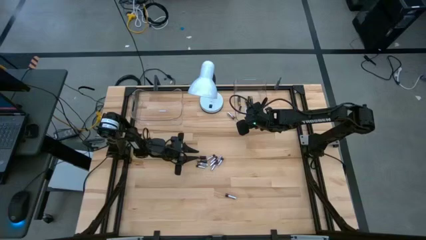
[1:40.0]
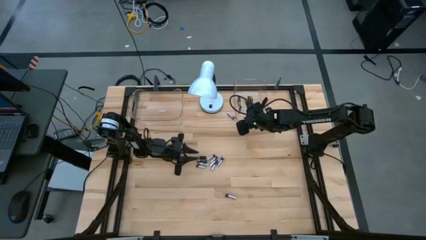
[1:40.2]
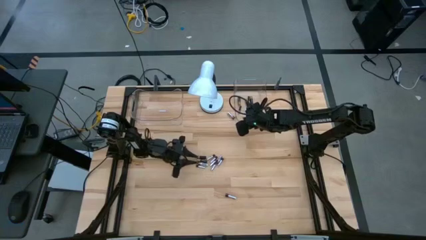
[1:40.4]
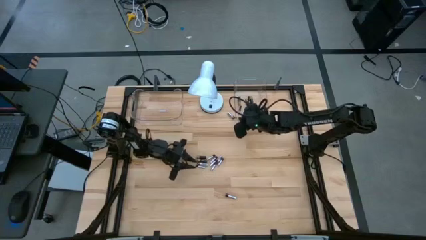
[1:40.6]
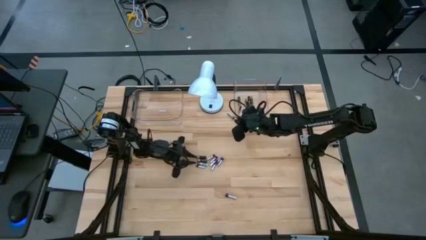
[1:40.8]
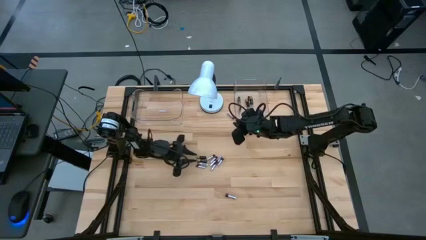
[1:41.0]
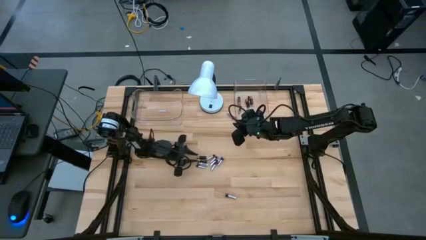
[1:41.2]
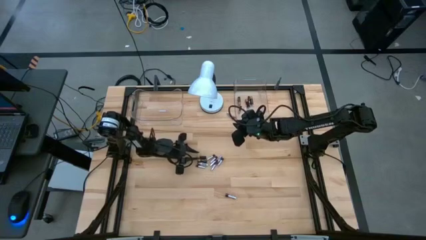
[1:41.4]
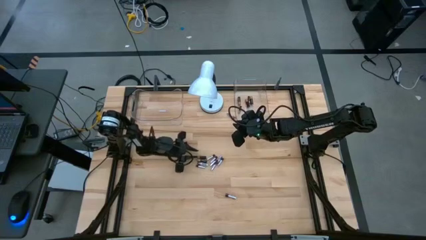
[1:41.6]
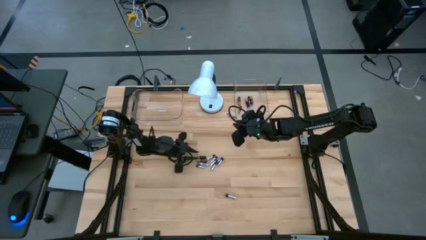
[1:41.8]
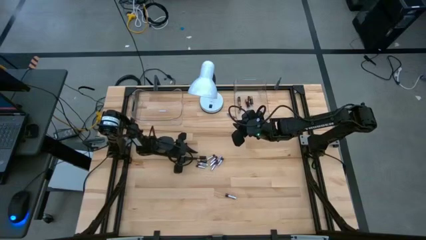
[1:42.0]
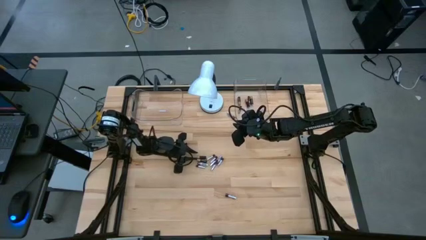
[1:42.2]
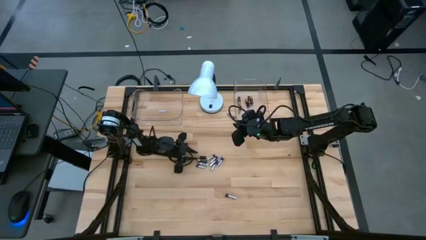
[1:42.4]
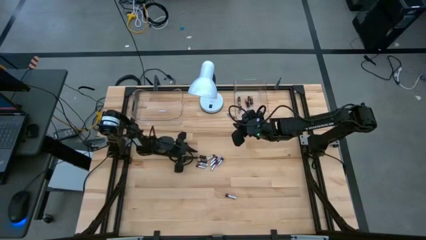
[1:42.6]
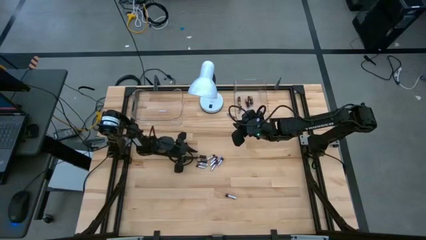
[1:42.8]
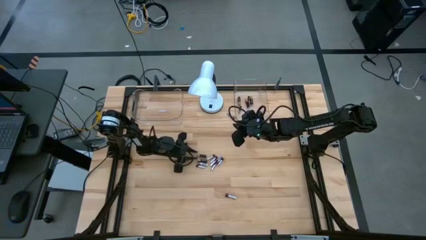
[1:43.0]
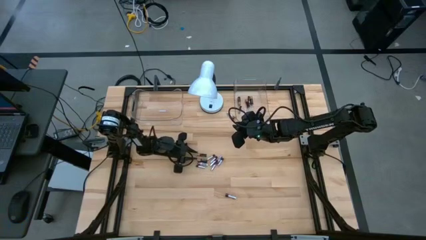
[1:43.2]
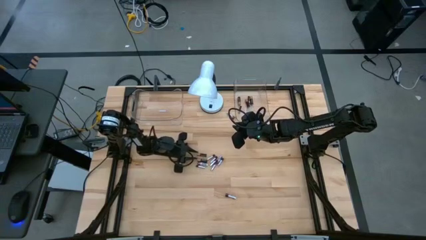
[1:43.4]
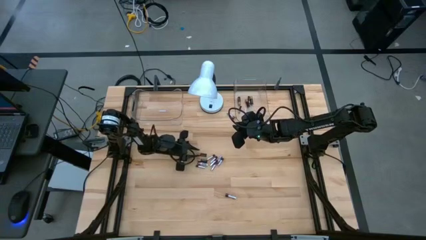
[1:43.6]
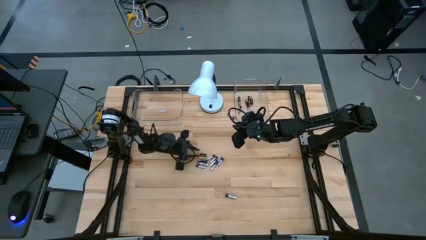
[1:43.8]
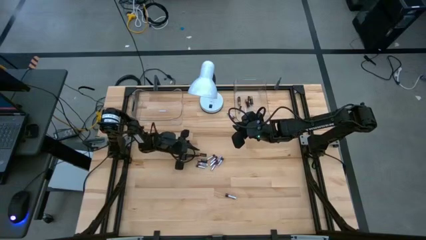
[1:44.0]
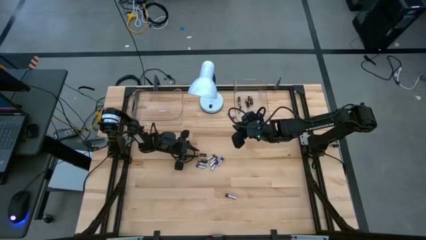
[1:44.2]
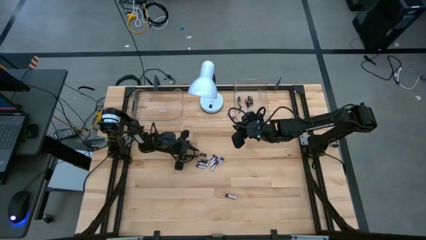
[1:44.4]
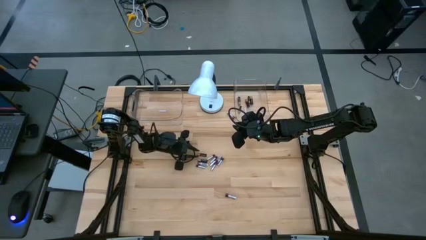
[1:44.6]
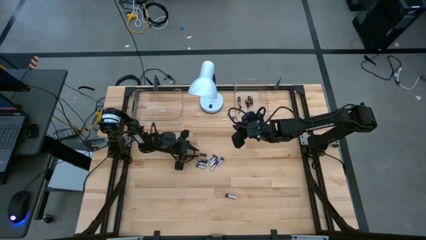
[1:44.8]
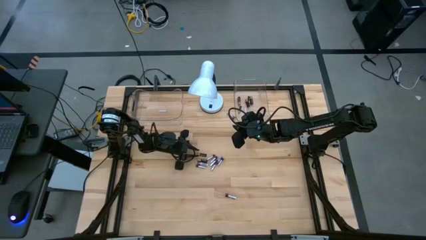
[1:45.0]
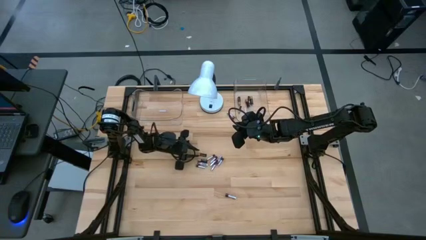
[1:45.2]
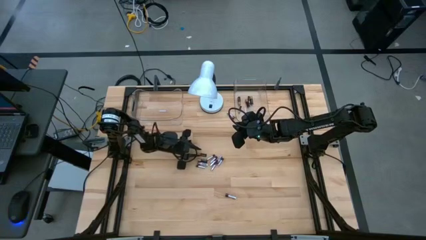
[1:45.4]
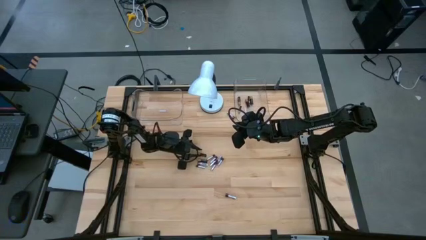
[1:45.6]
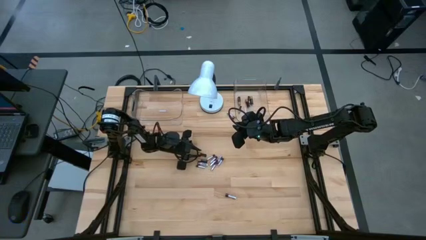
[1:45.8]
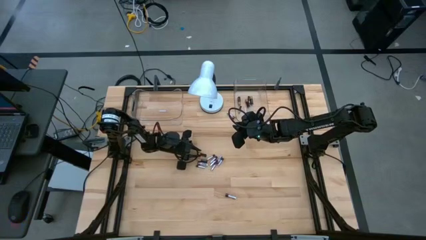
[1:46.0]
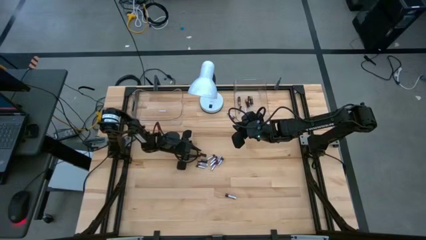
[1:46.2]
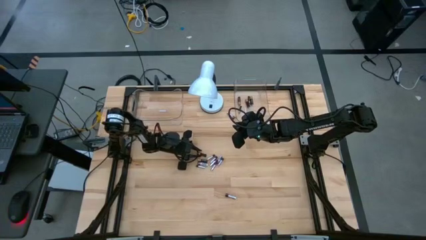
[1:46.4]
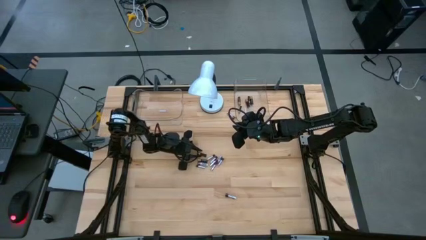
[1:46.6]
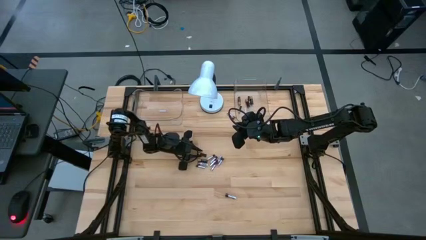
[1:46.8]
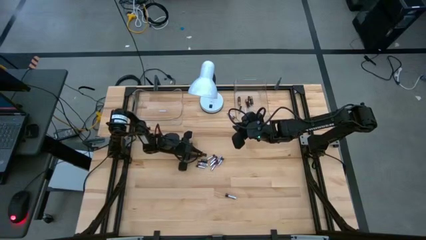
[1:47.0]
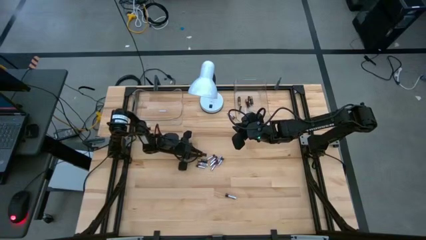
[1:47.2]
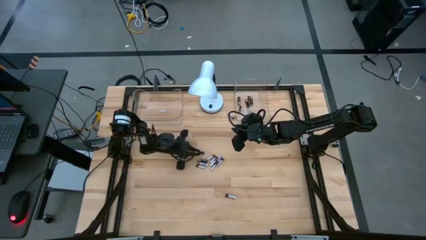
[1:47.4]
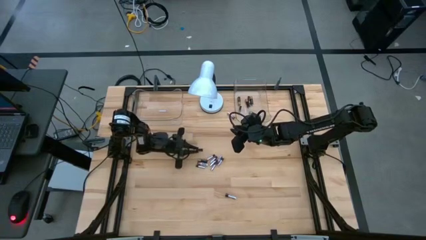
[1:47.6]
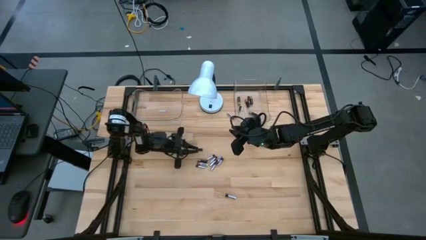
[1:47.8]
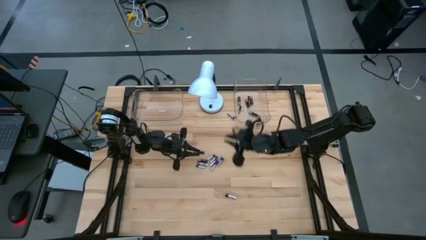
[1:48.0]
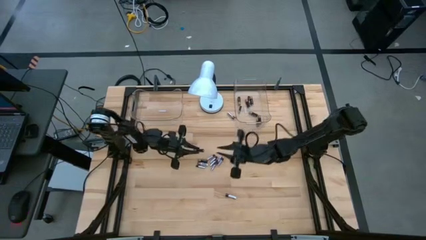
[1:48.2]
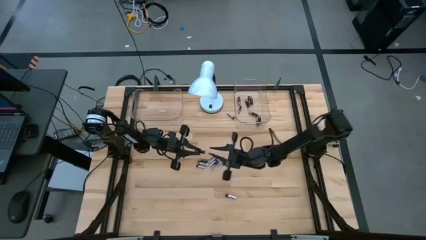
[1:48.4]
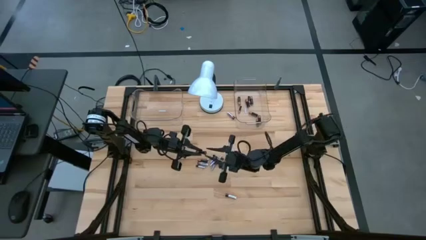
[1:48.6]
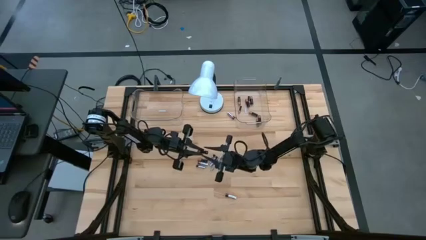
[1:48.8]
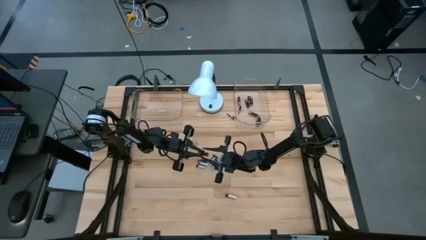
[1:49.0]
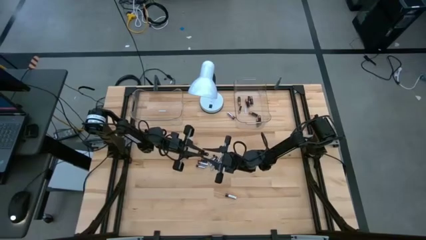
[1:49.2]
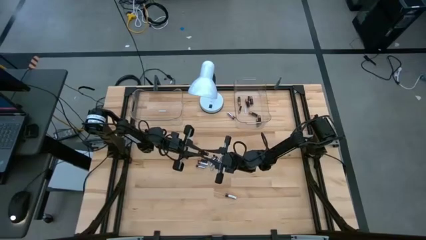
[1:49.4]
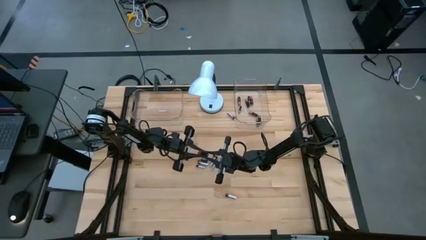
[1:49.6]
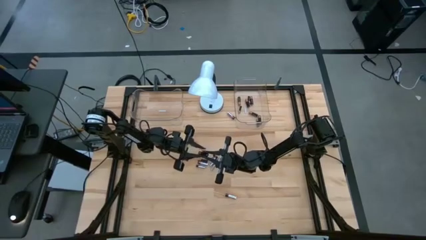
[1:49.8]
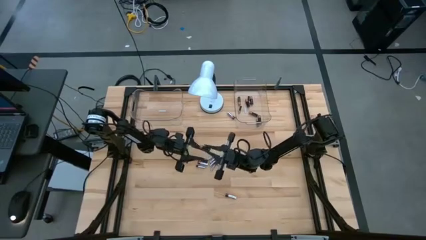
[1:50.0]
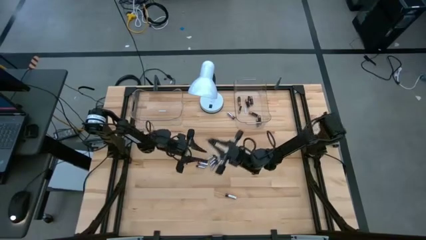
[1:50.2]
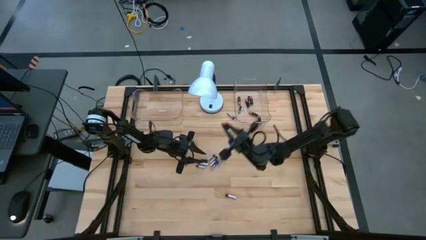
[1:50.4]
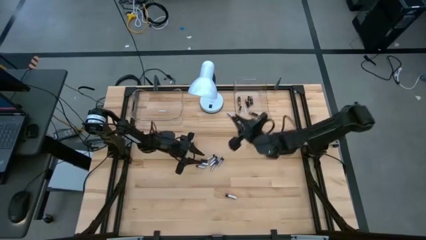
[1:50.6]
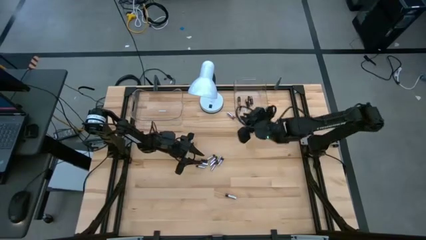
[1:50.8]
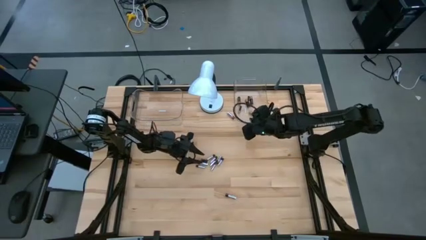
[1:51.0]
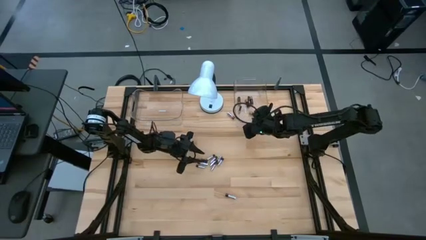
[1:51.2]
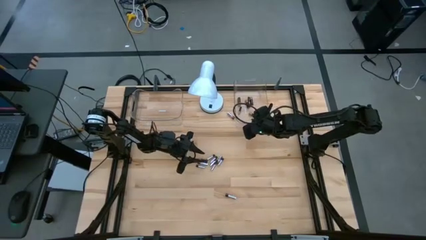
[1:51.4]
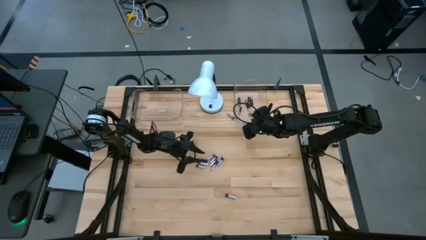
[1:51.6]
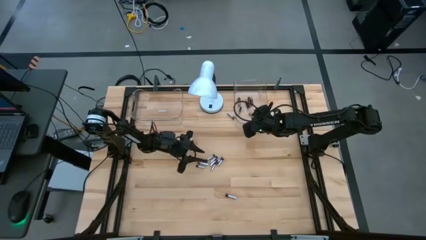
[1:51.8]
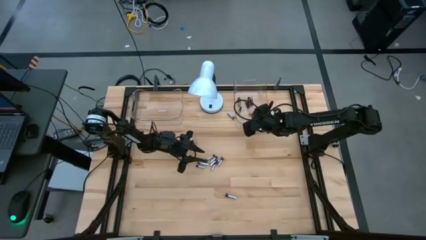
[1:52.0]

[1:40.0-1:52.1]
Task: Sort batteries
Put the black battery in the transparent bin

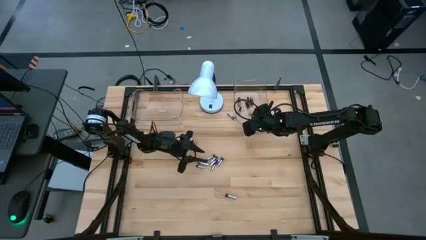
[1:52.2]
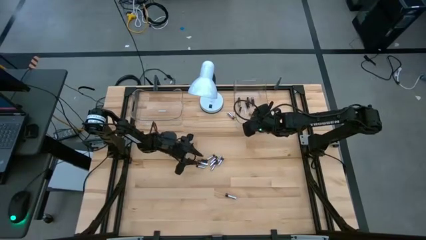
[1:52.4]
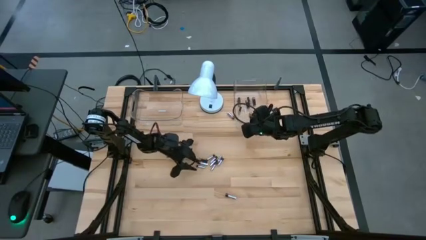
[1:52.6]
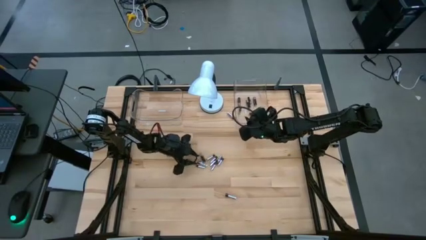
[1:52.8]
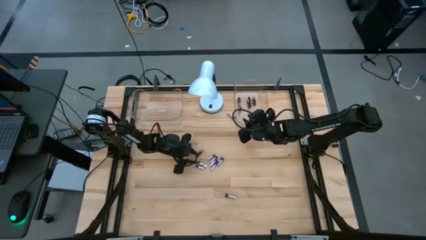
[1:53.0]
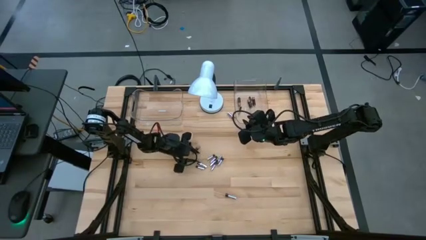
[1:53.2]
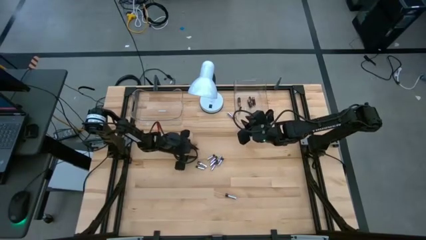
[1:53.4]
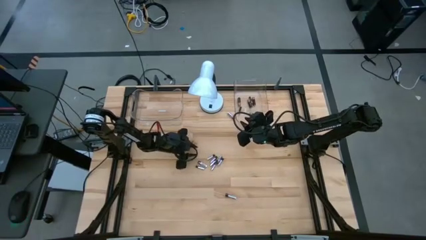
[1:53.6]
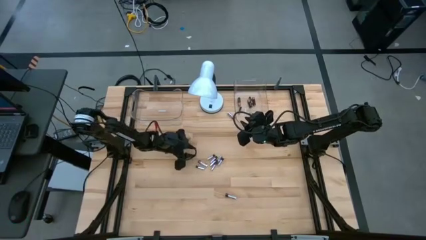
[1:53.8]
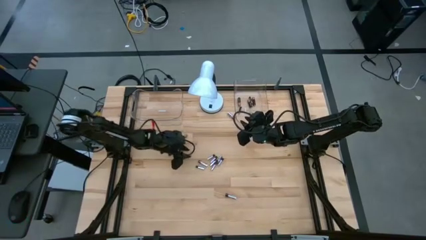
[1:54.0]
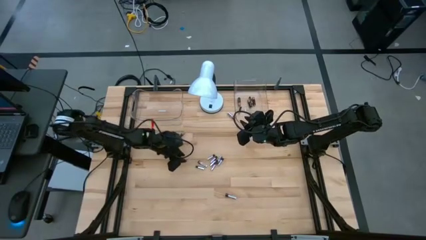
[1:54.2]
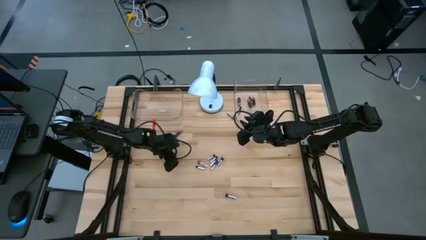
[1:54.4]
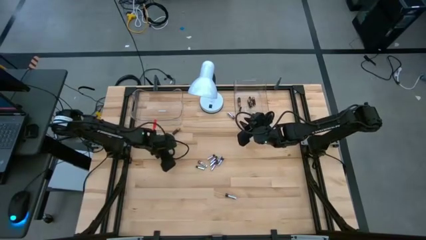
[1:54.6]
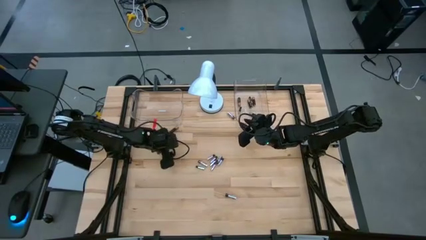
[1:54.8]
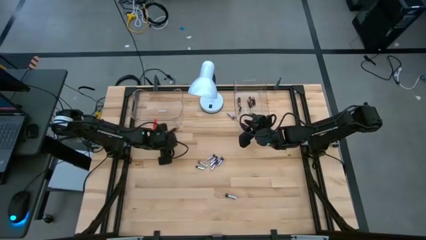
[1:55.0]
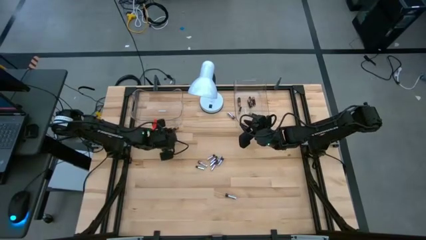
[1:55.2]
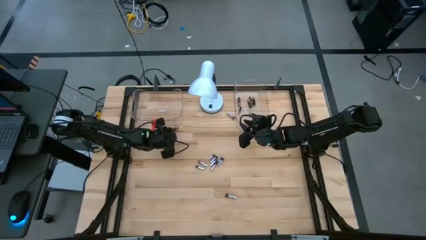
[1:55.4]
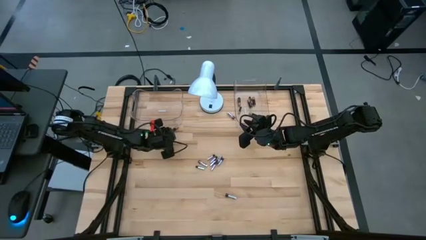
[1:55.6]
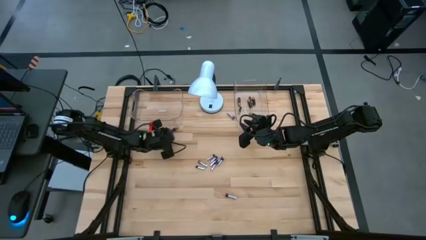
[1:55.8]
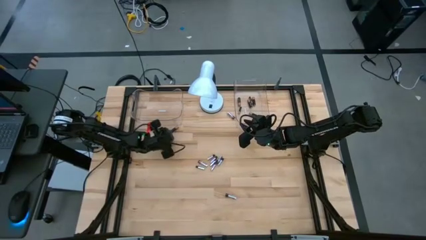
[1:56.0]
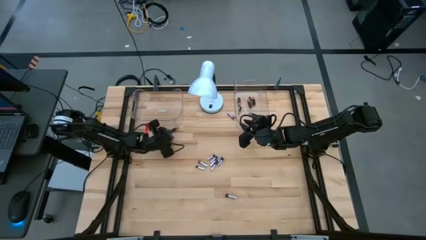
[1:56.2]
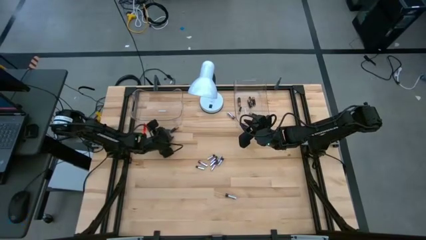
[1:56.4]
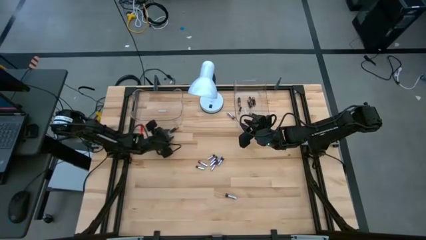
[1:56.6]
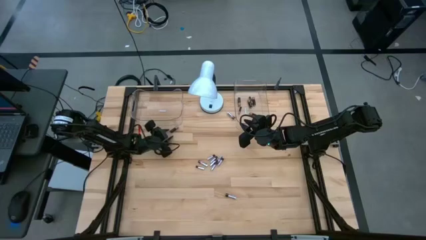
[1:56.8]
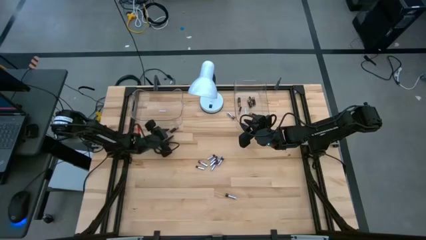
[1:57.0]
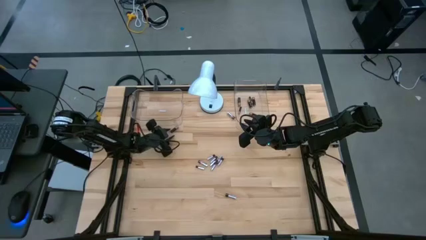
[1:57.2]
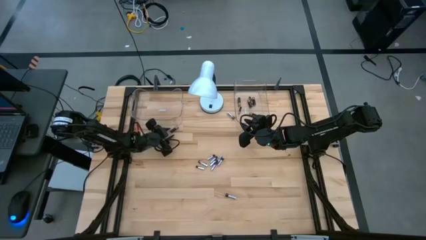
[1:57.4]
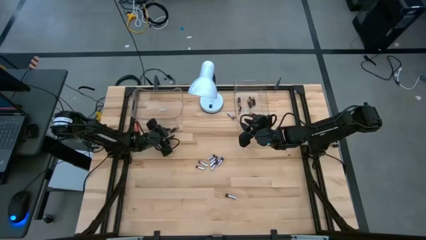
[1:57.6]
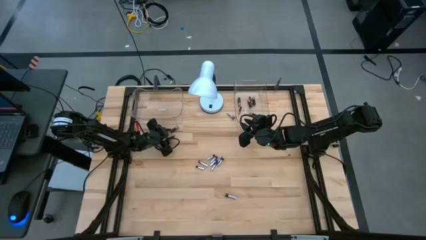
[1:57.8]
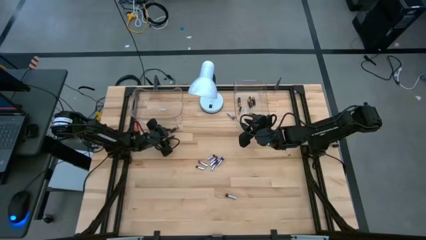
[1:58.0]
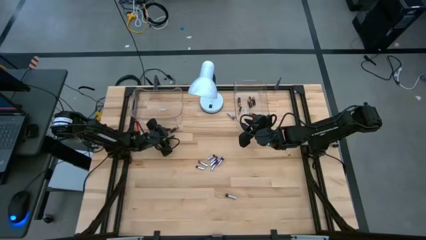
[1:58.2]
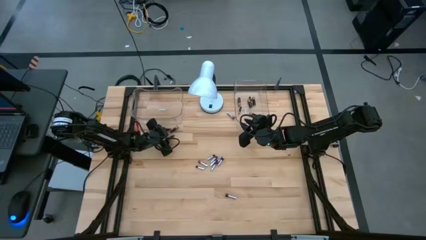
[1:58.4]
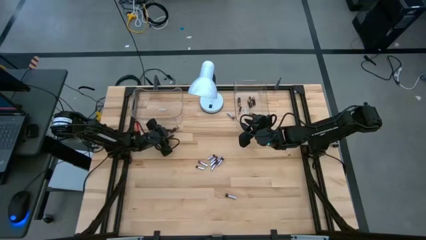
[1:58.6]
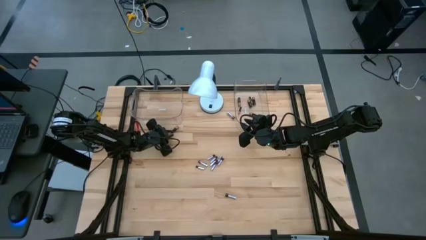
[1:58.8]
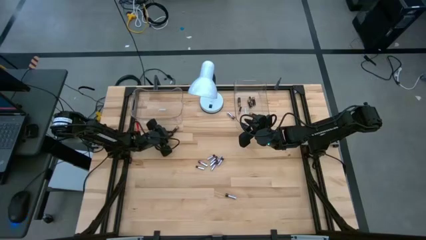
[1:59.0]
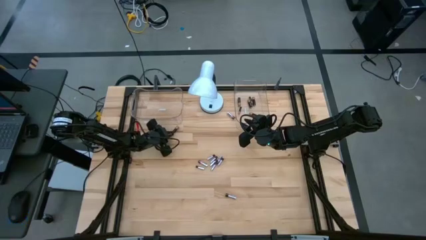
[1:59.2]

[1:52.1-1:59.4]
Put the black battery in the transparent bin
